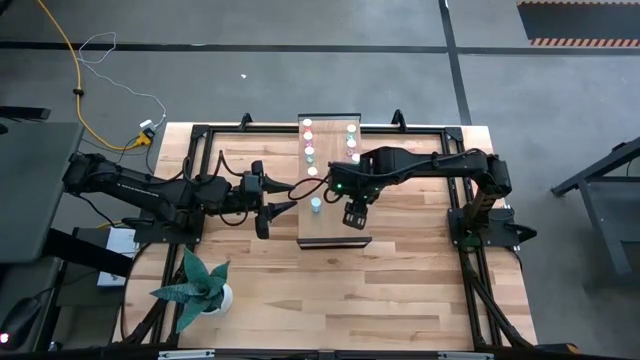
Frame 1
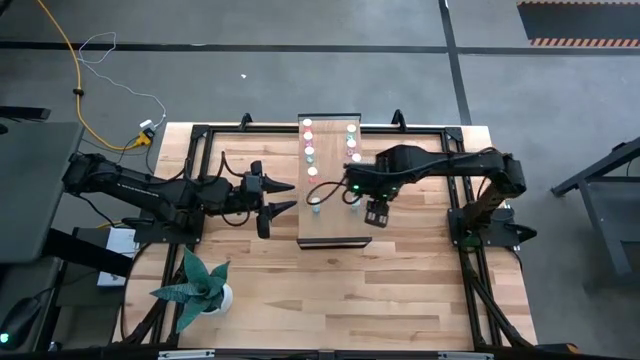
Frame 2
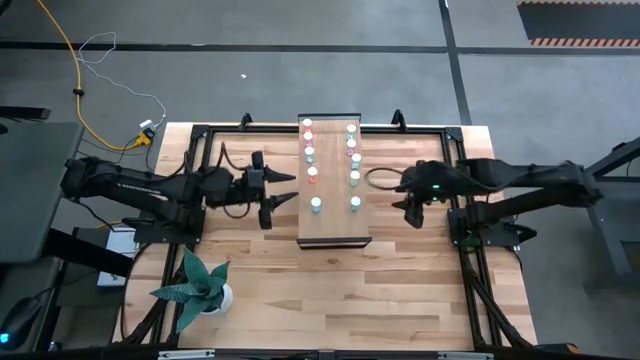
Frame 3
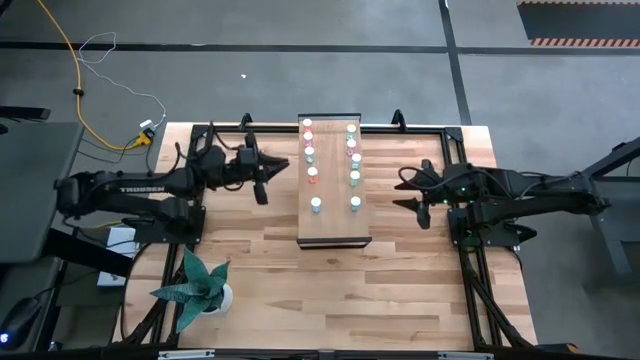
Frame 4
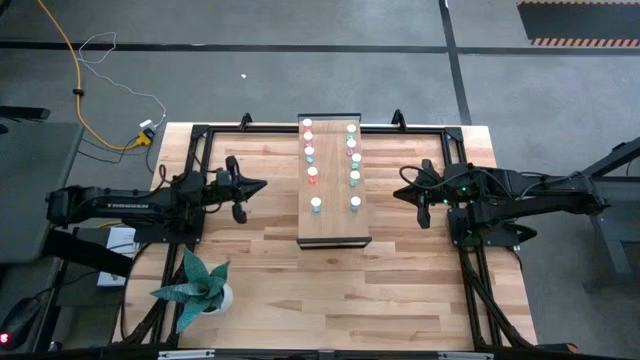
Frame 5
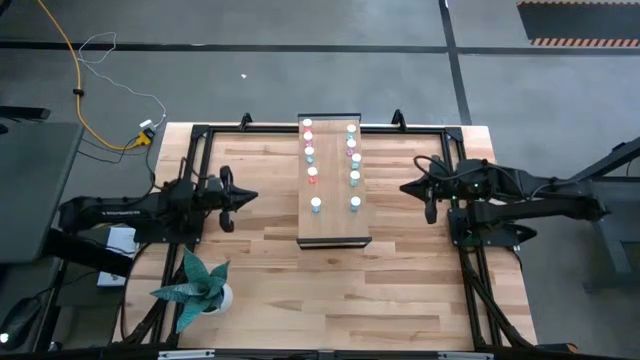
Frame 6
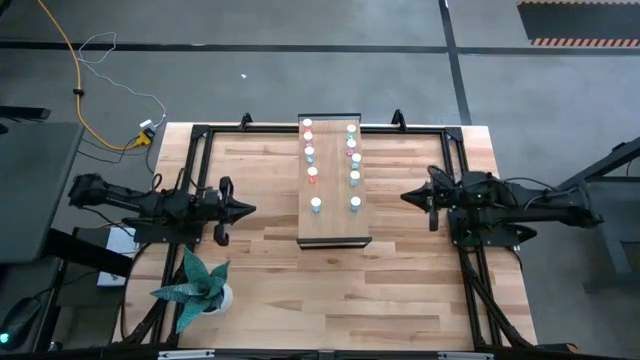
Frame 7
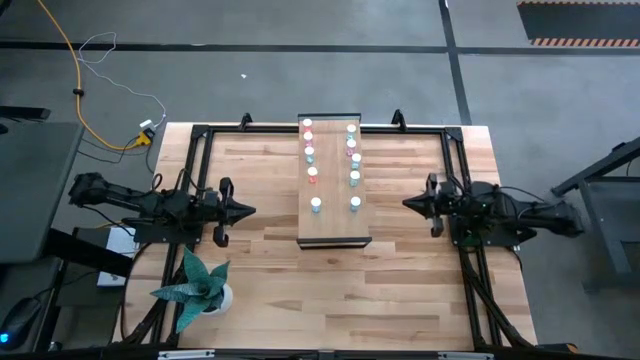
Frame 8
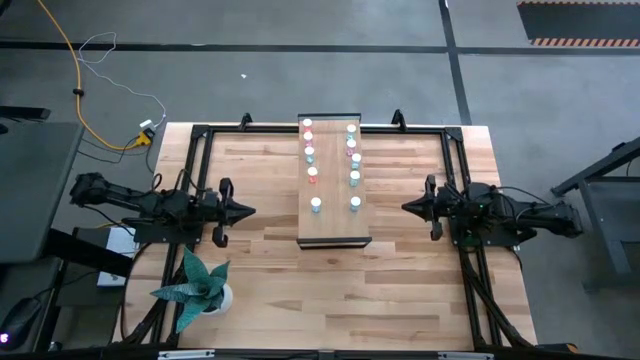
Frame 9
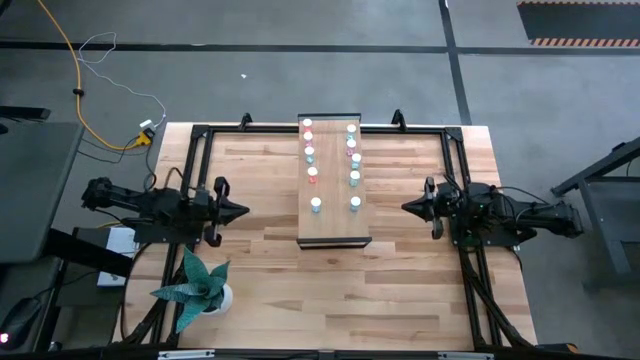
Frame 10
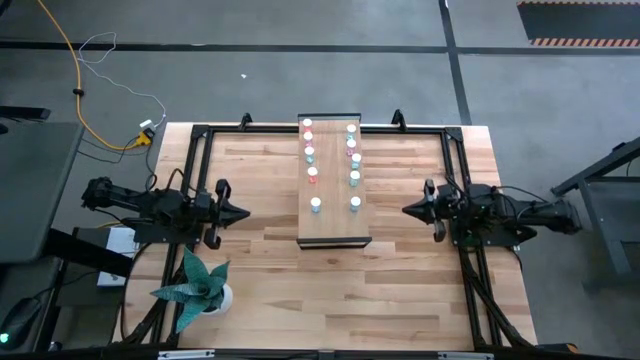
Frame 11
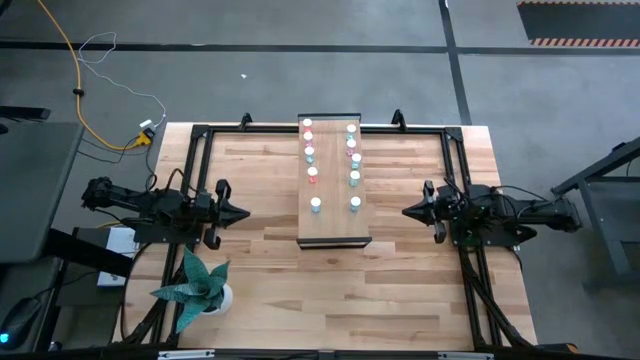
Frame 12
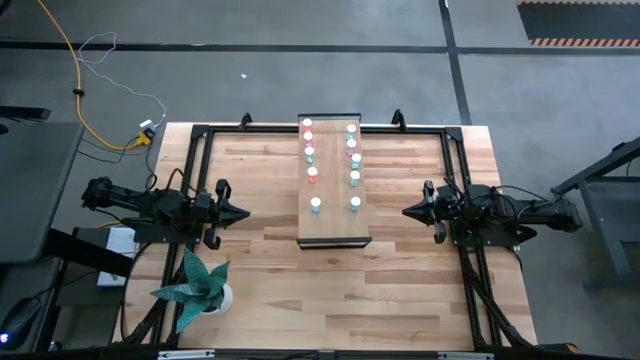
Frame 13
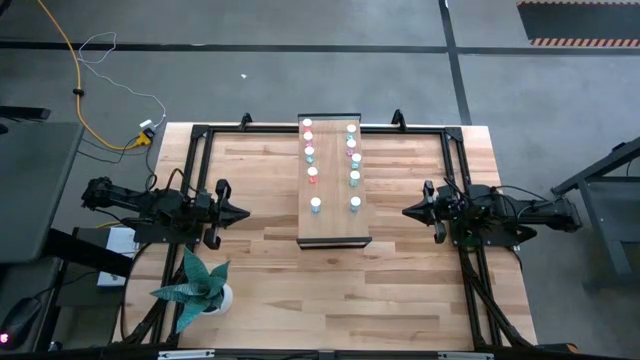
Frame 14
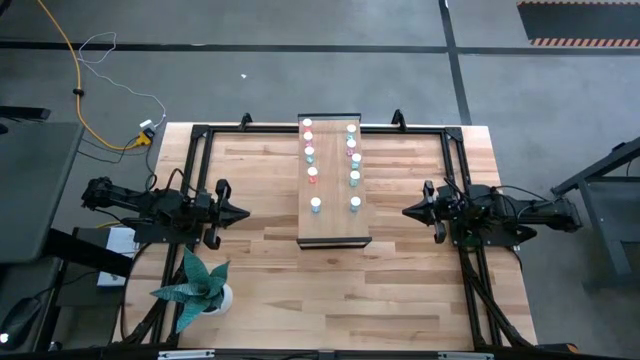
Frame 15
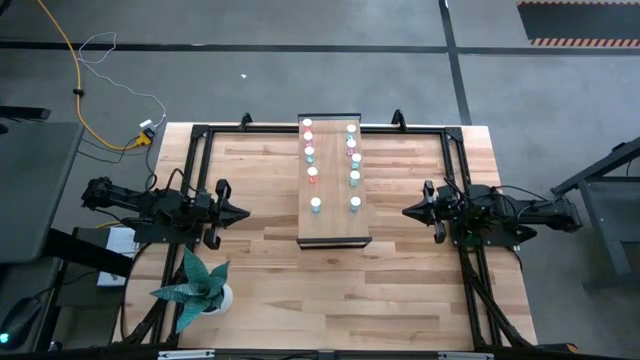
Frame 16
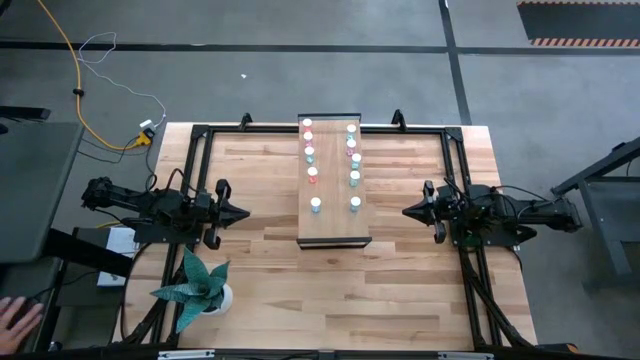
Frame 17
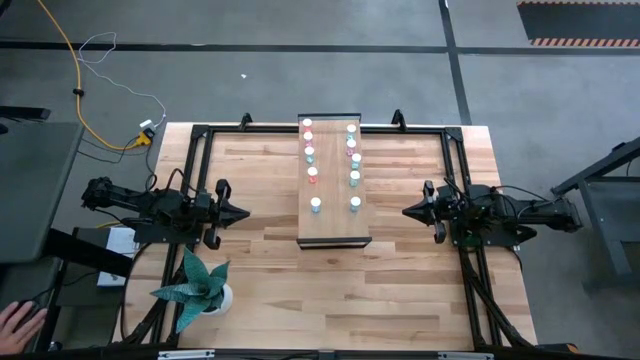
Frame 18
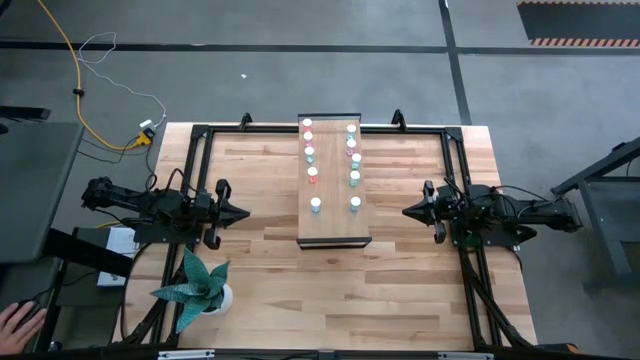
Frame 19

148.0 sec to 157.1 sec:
Task: Pick and place medicine bottles onto shelf by color
Return to Home Position

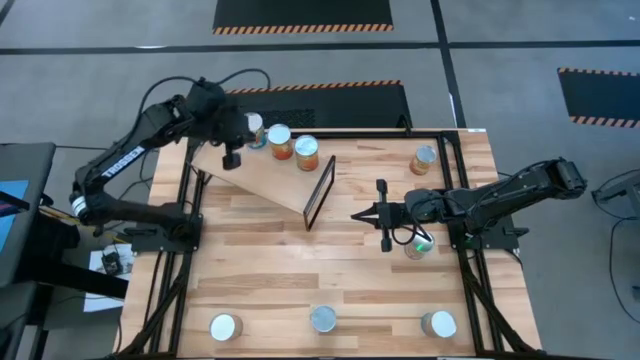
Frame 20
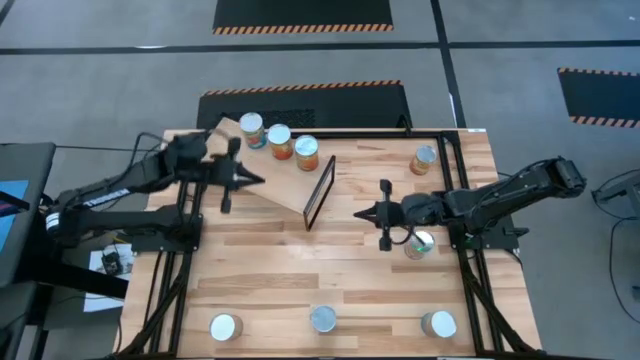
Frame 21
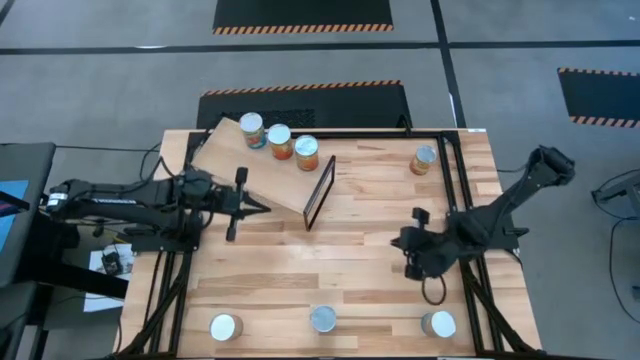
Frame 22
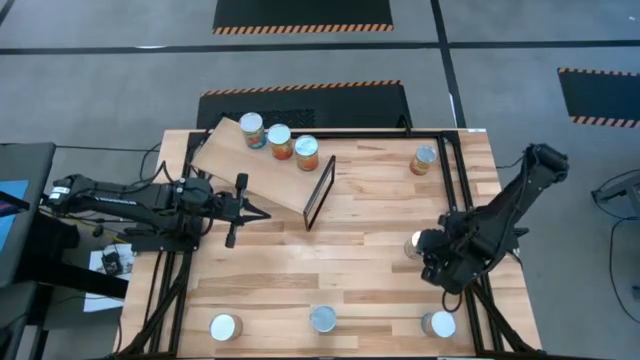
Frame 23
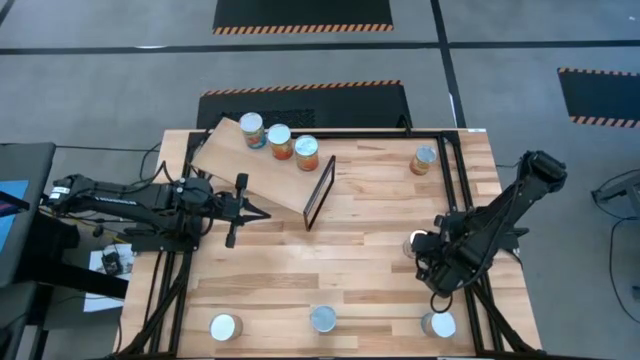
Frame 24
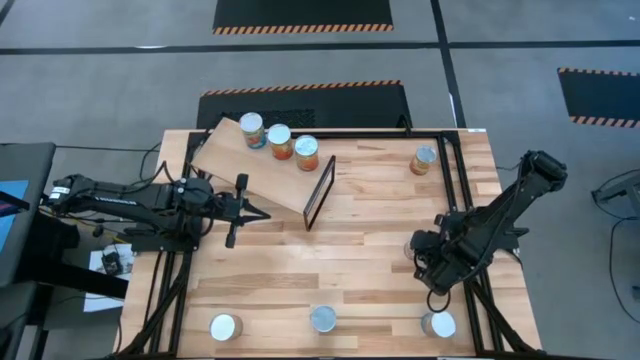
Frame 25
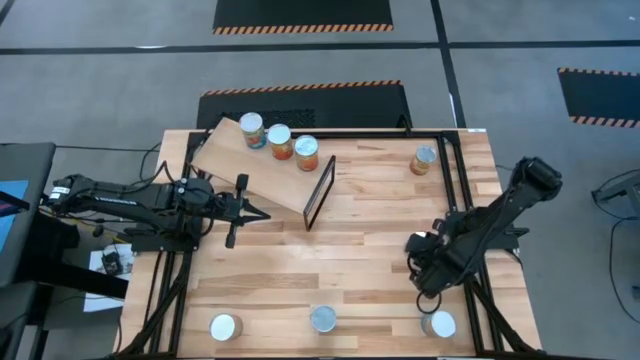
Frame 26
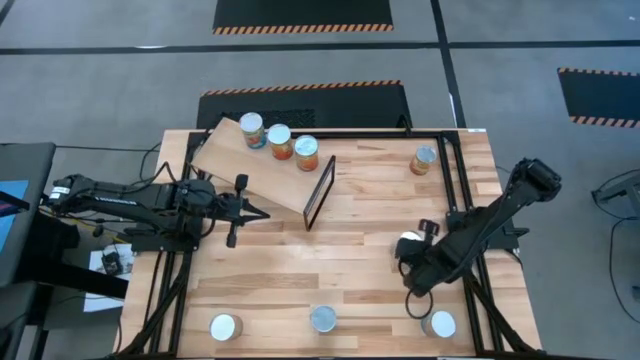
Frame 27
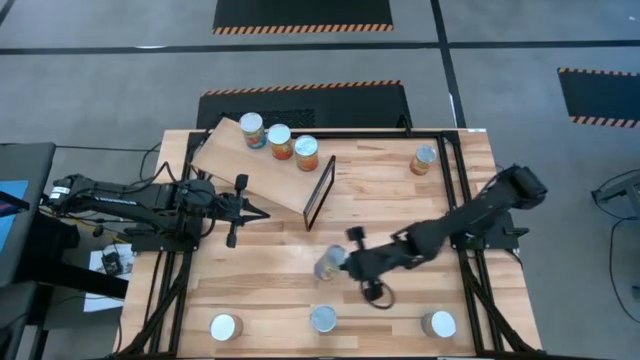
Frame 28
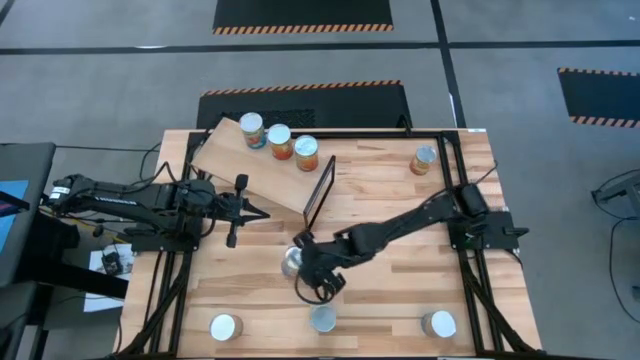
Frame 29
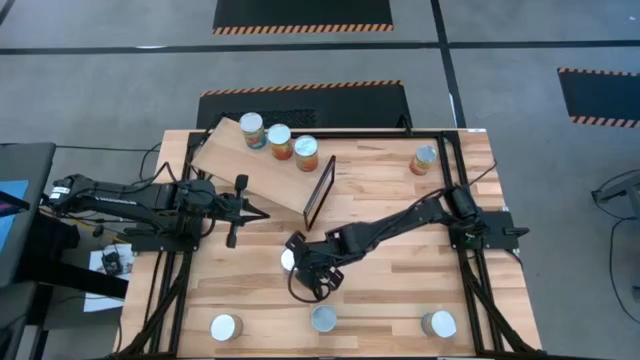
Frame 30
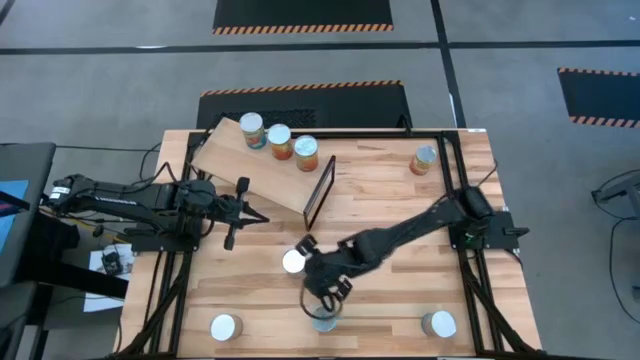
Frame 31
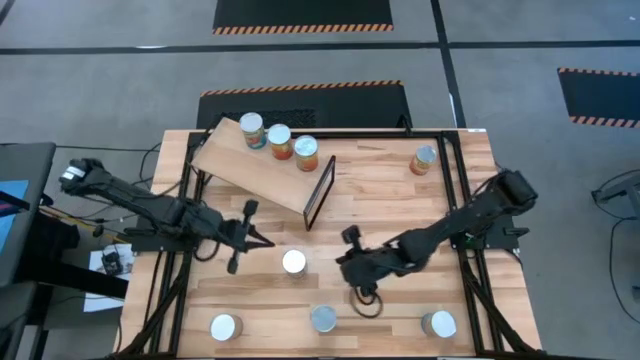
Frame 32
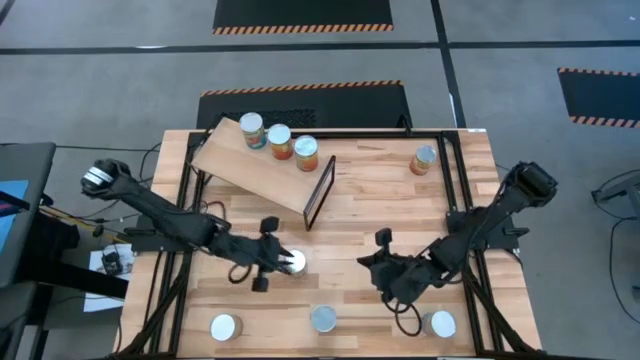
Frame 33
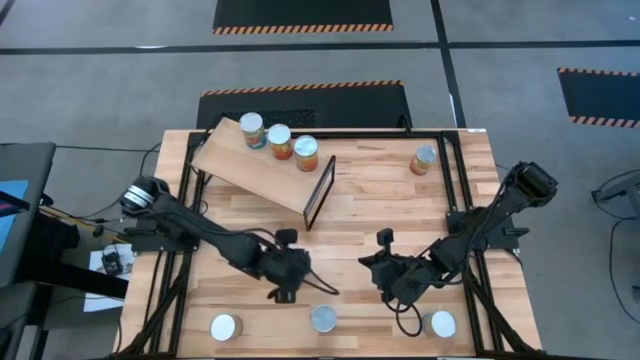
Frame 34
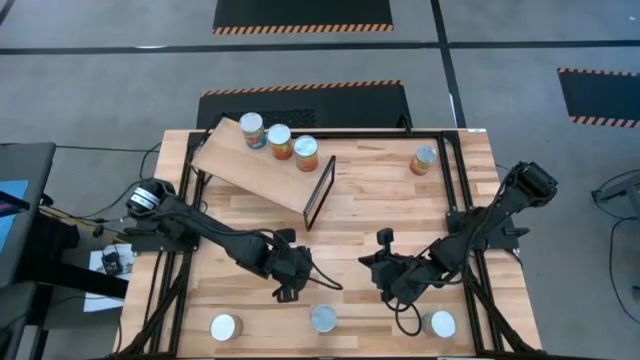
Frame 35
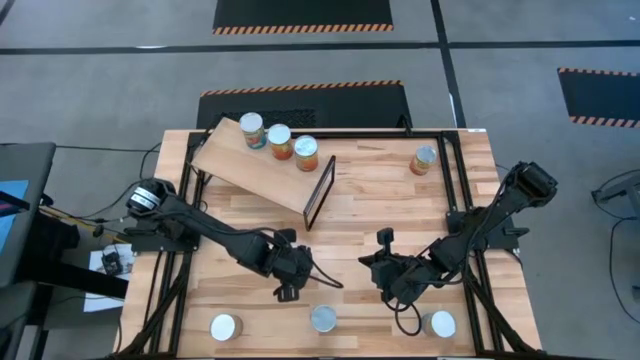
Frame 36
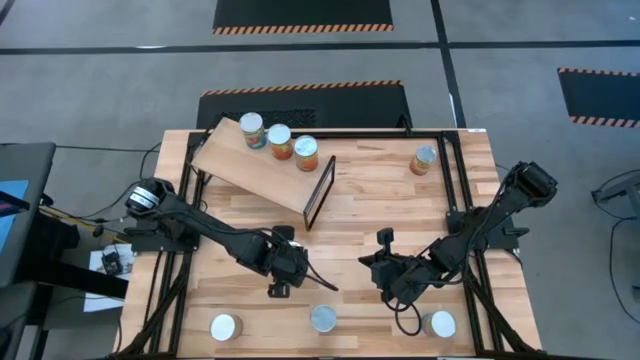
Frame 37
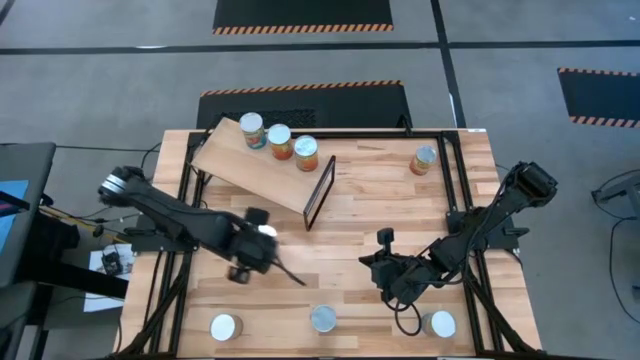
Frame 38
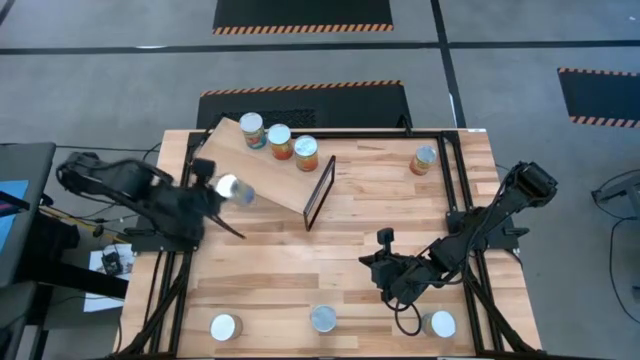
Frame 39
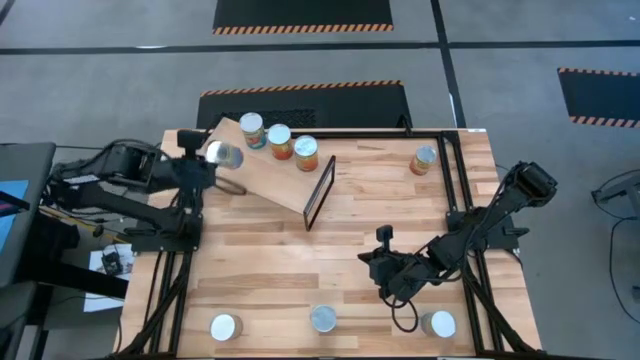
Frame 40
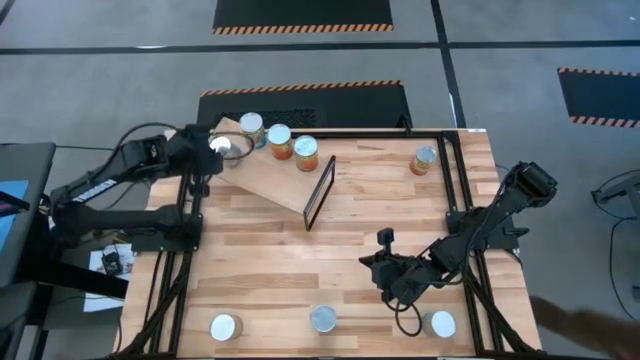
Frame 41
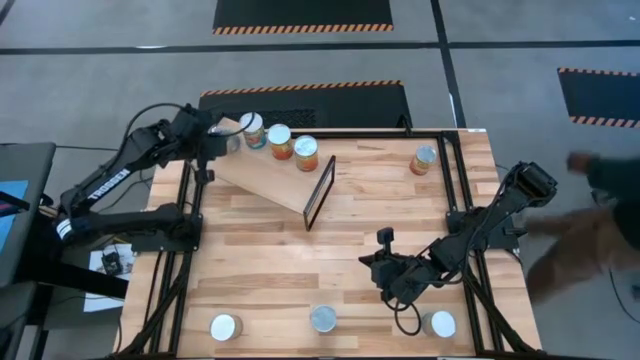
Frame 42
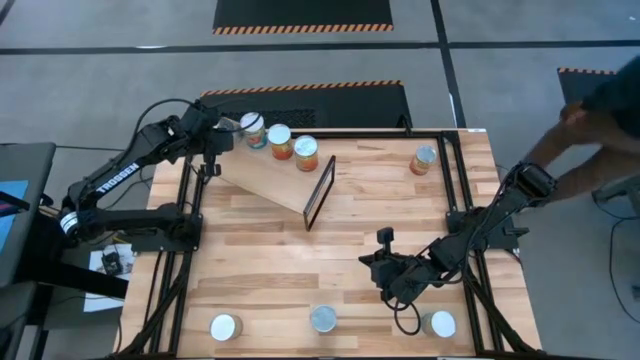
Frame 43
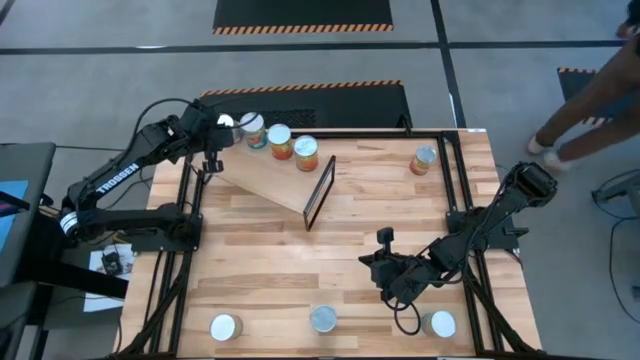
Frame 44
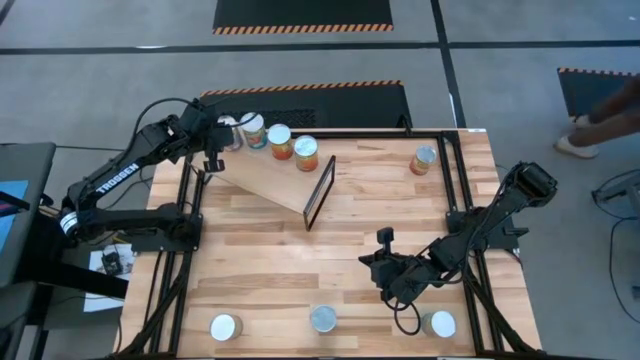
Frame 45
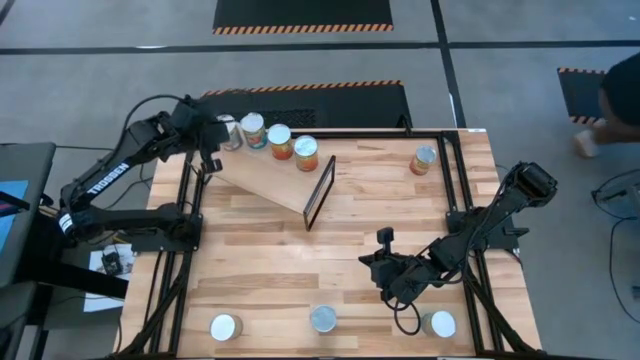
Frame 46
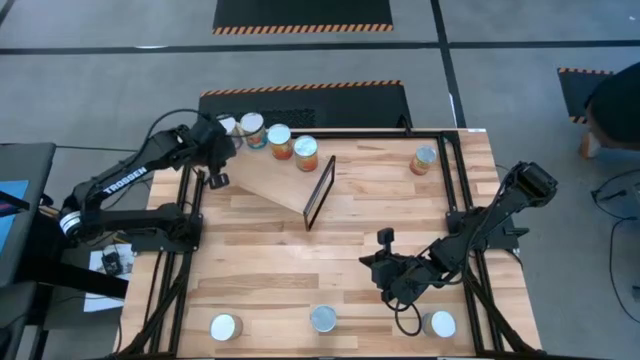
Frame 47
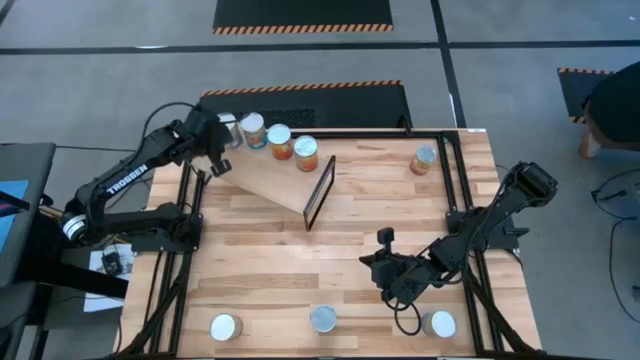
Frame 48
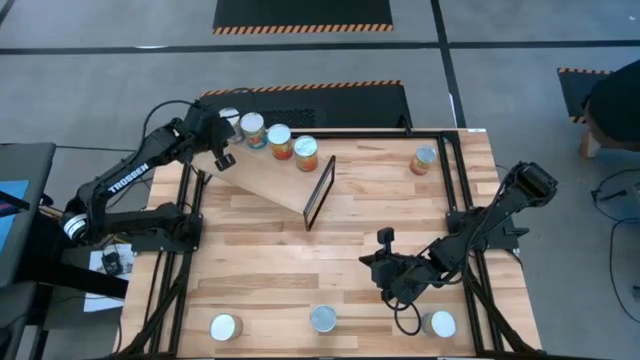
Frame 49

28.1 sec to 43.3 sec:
Task: Pick and place cans onto a shelf
Put the top canned peaches on the shelf
